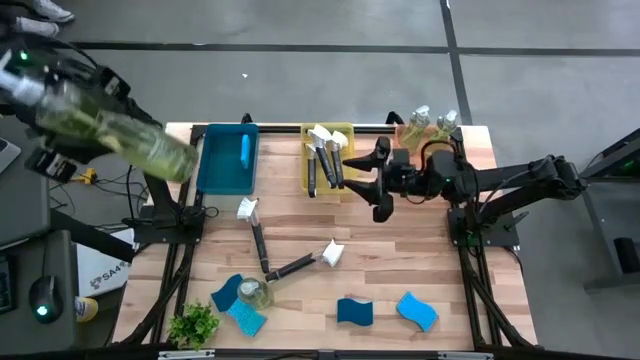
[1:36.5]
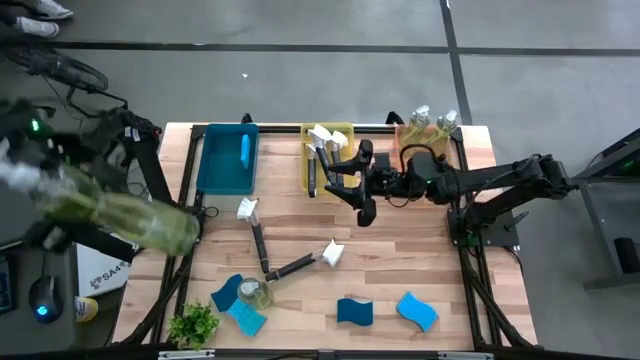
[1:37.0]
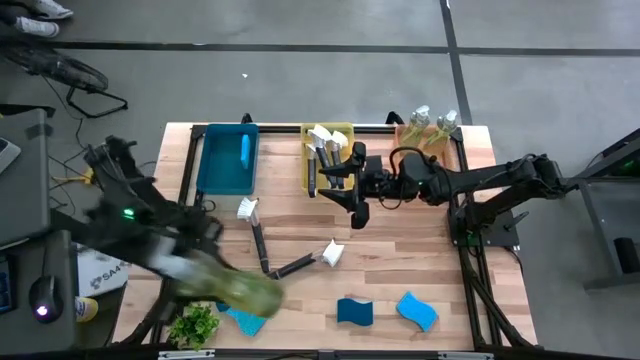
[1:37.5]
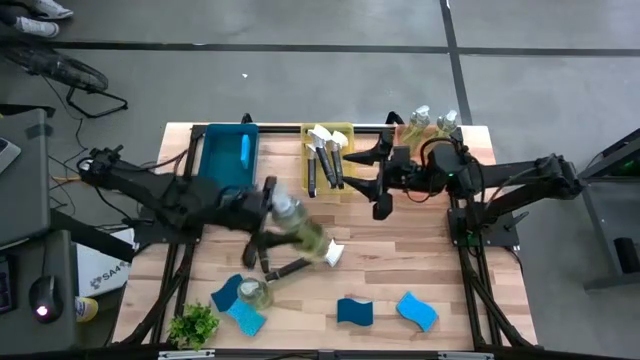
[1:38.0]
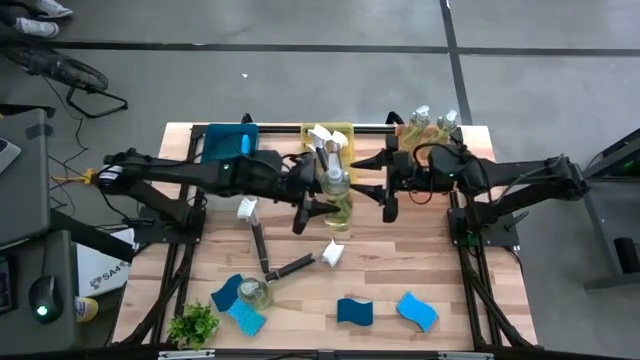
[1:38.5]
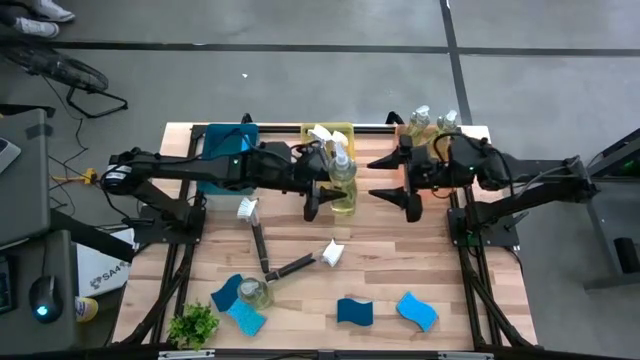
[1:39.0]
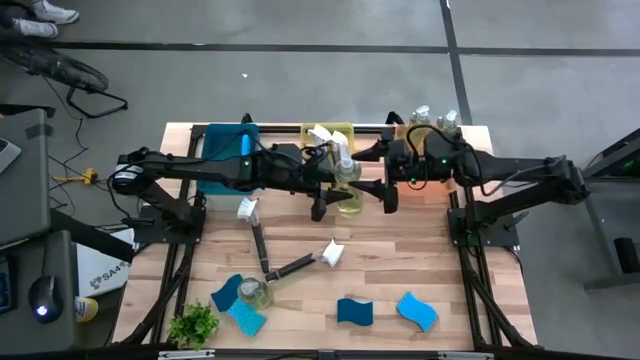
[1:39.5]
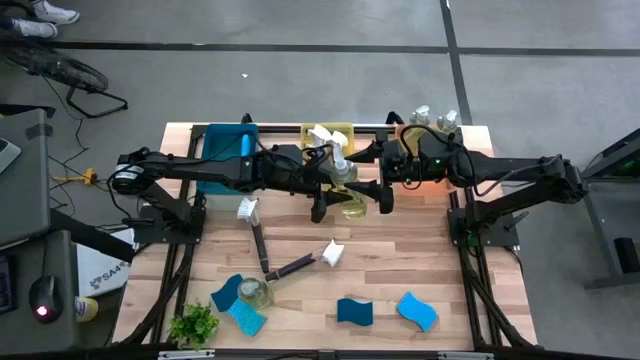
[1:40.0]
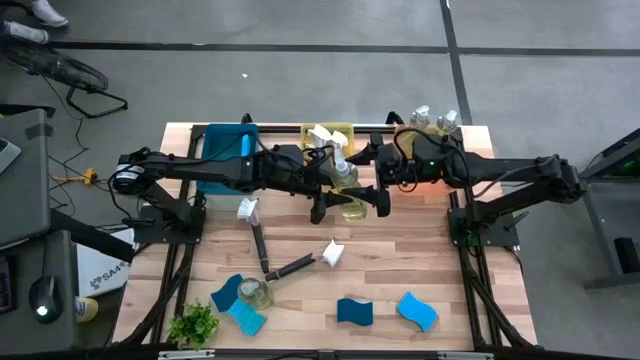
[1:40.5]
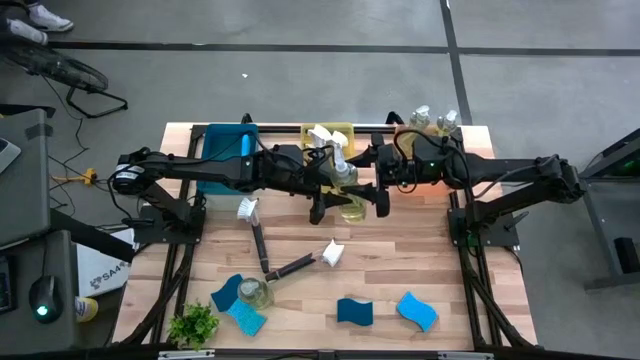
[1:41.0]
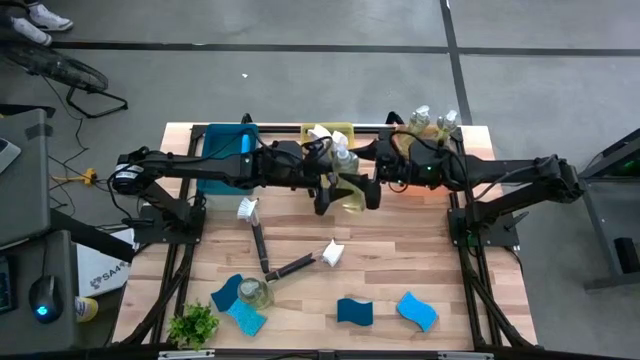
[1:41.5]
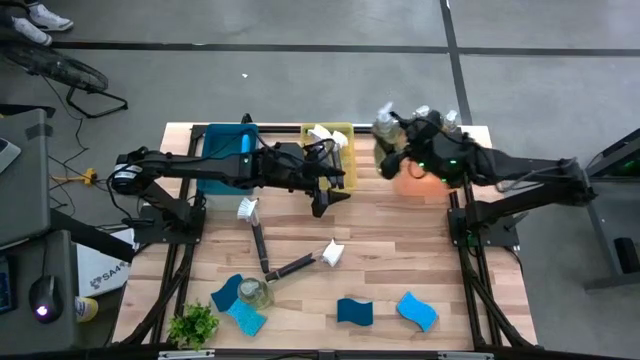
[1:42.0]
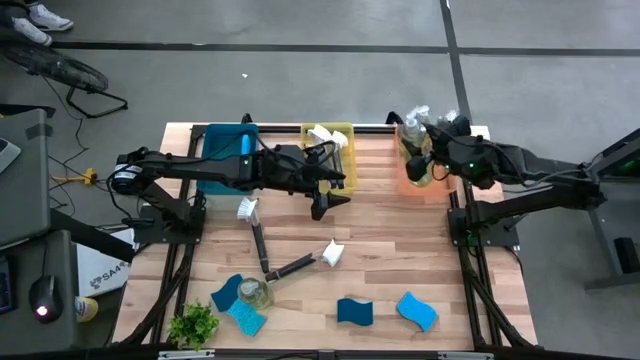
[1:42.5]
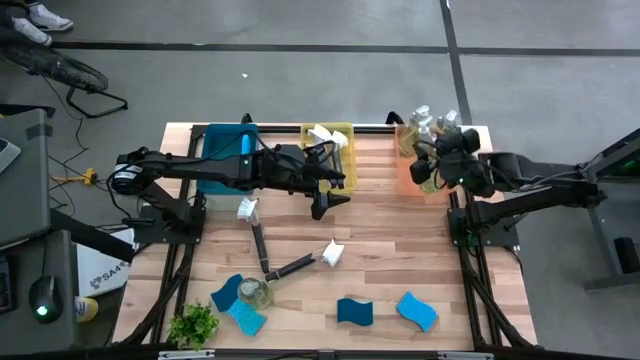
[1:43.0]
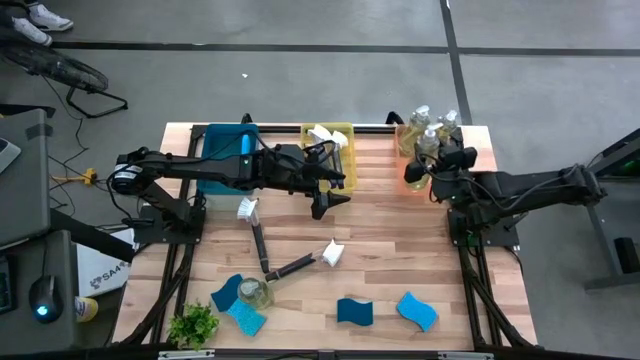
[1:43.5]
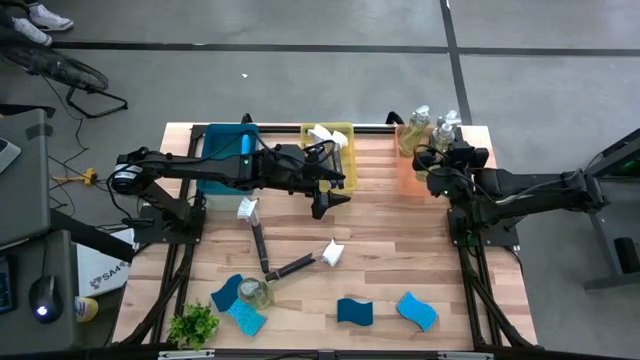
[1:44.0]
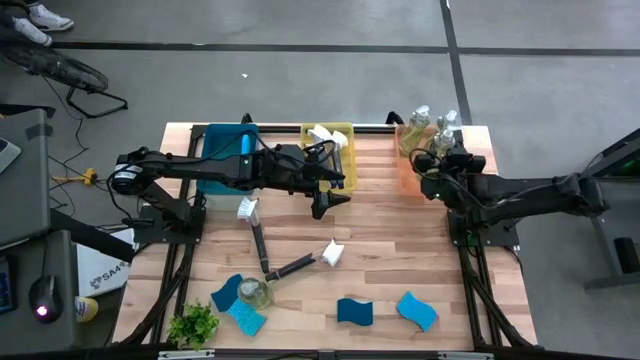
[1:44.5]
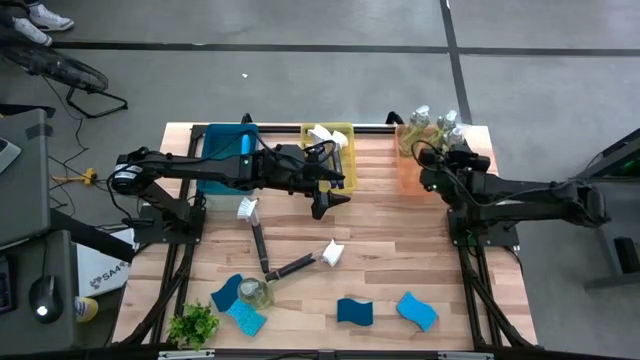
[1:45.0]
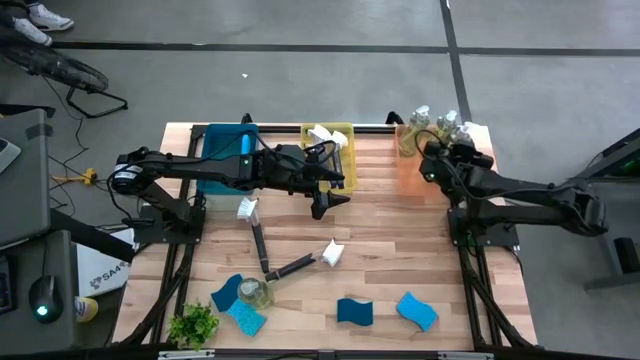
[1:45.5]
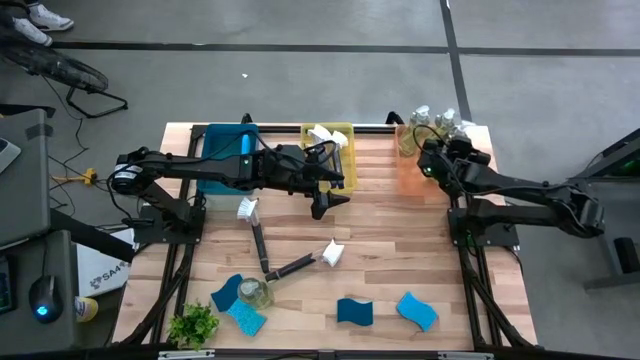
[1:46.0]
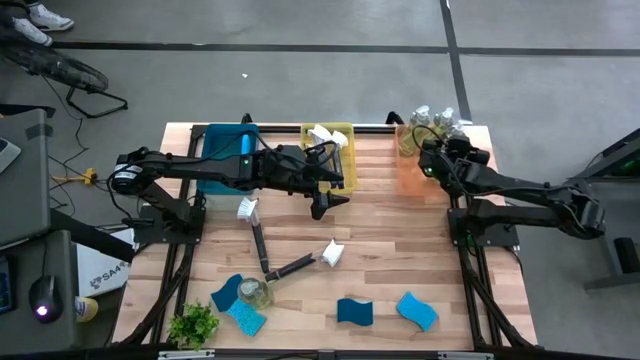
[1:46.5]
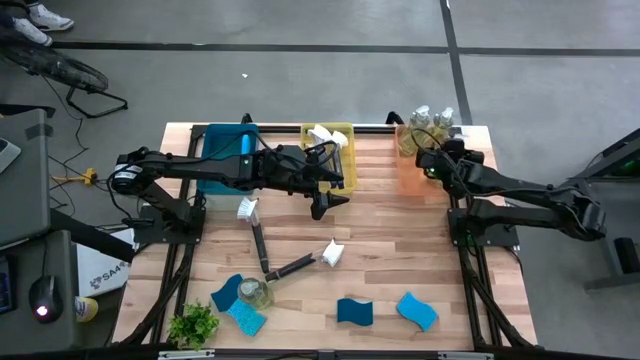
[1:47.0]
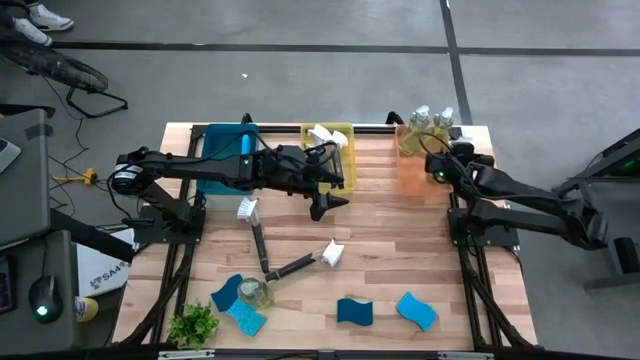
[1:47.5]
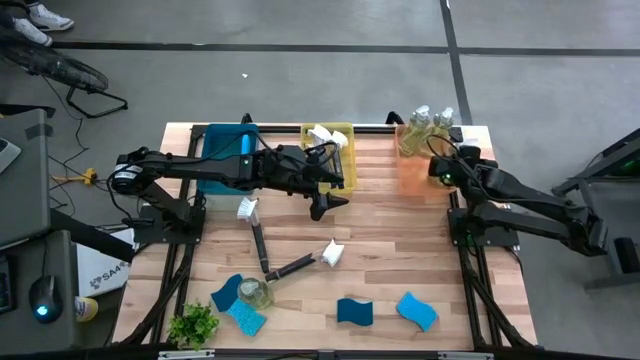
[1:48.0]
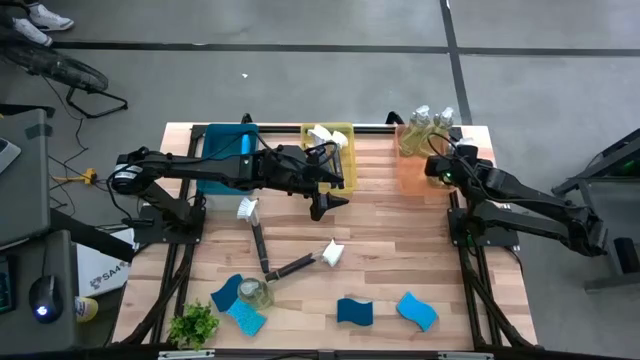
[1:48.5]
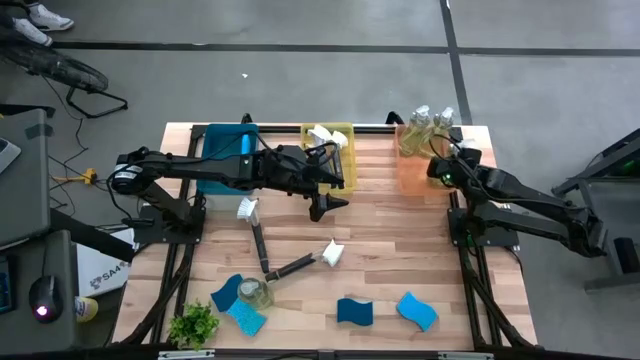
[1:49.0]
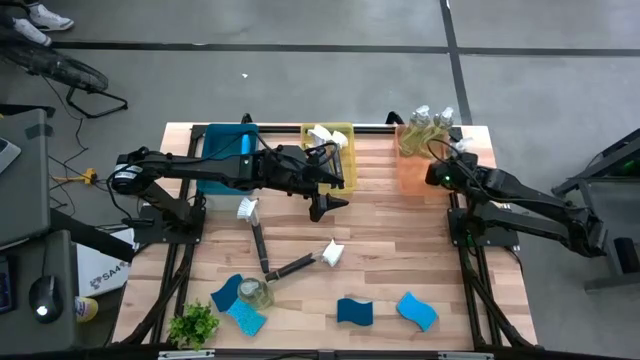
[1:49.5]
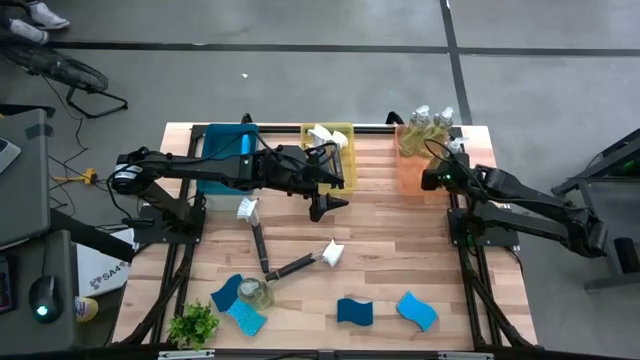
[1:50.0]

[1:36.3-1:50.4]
Task: Pick & Place Kitchen Sink Supplies
Put the green dishwashing liquid dispenser into the orange bin
